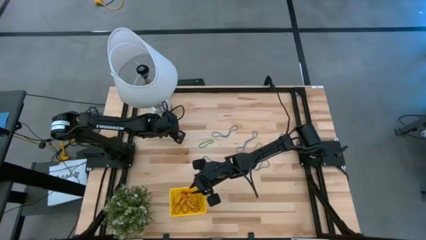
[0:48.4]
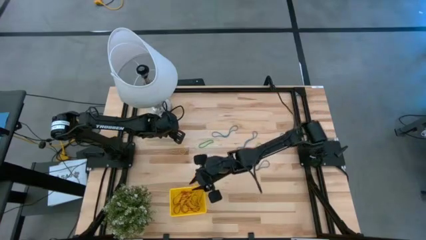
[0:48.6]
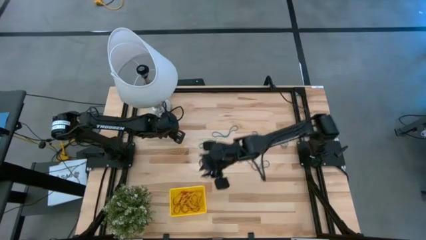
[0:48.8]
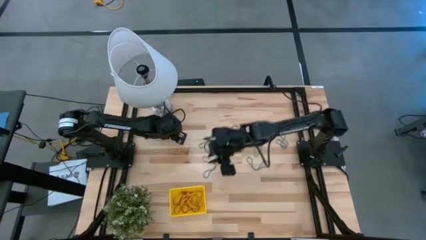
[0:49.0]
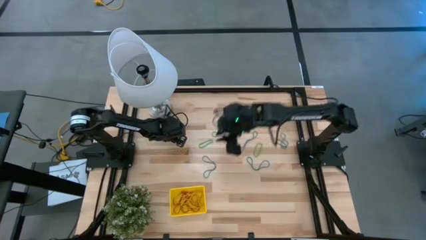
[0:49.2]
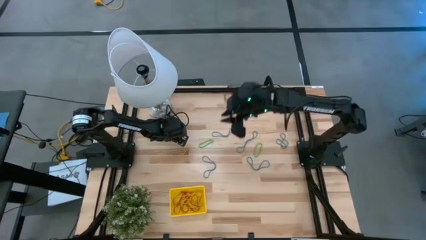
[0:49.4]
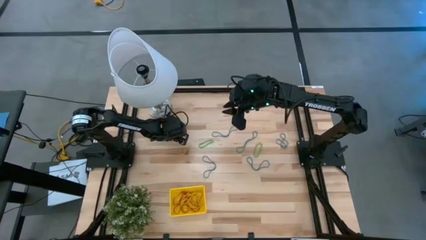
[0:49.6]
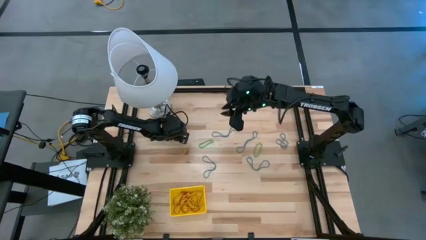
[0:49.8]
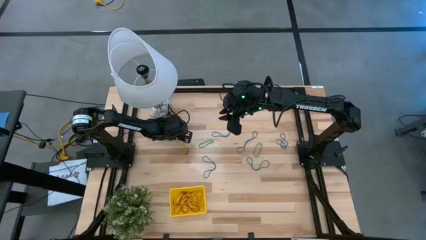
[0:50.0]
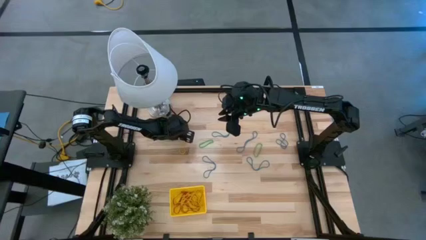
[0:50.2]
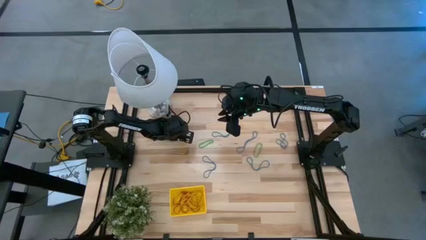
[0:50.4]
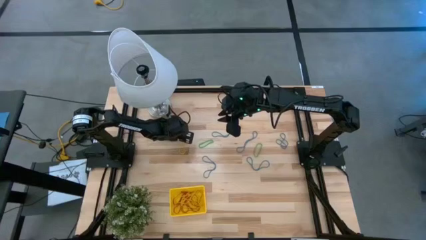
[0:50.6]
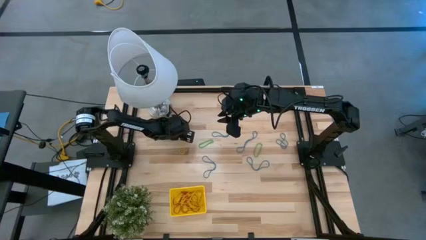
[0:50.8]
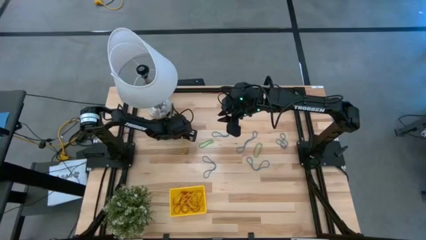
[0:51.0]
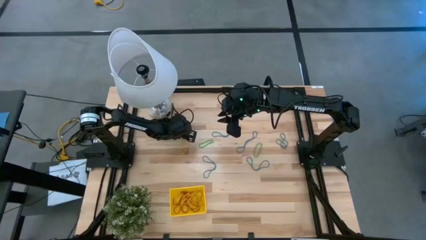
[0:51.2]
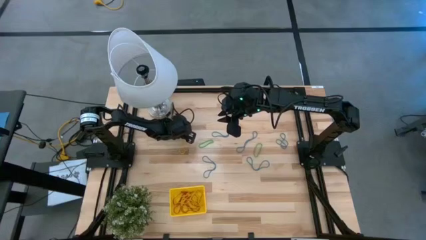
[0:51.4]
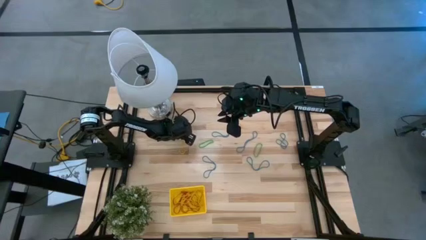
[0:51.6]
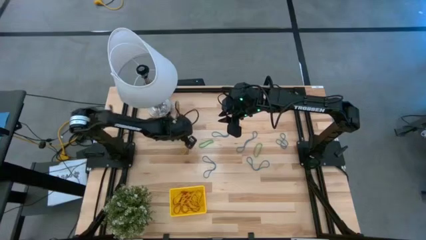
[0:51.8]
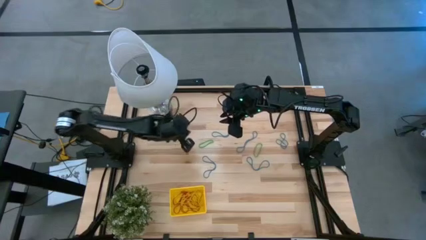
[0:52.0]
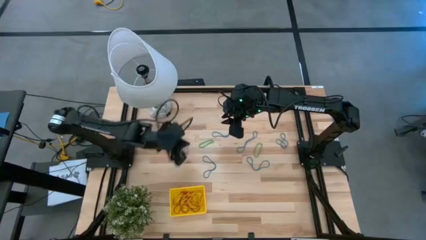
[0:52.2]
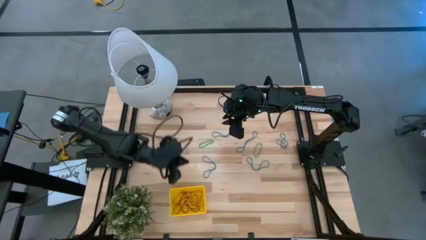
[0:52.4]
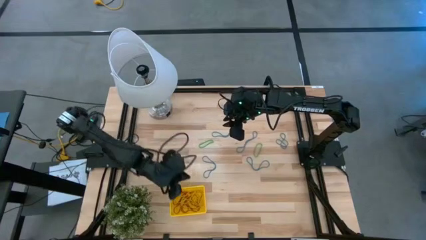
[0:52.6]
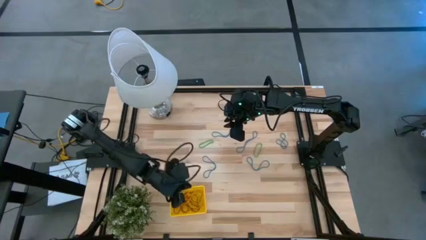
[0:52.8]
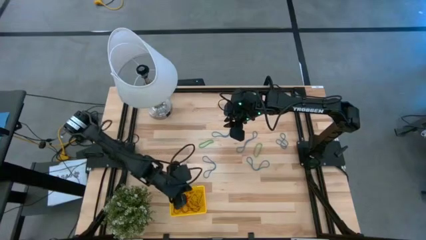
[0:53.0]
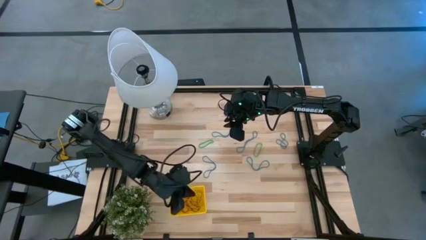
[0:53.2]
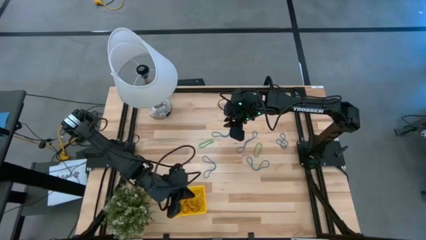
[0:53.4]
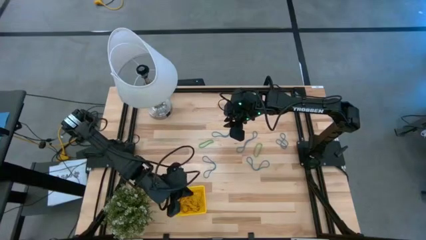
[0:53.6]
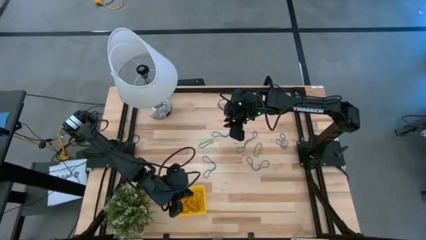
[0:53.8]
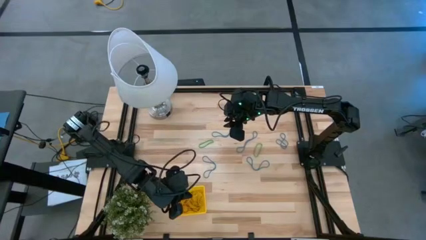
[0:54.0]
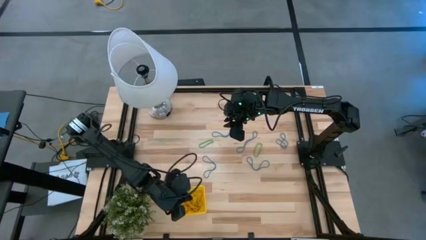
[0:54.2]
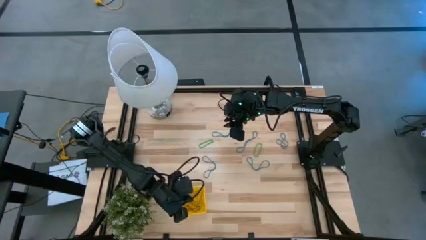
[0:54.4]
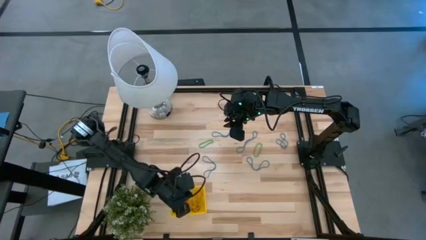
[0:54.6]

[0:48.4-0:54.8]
Task: Pick and place items into bin
Put the yellow rubber band into the yellow bin

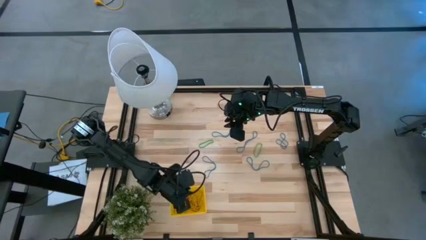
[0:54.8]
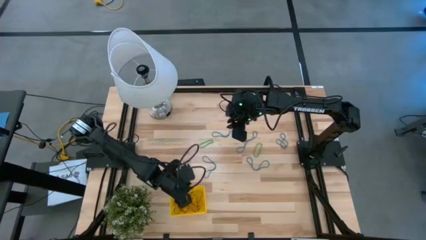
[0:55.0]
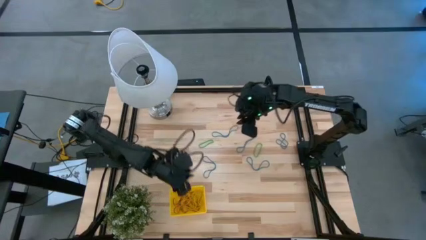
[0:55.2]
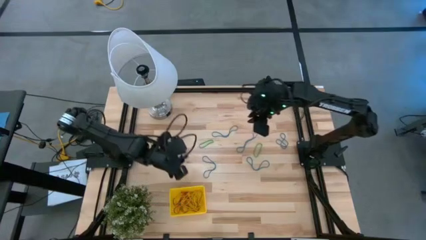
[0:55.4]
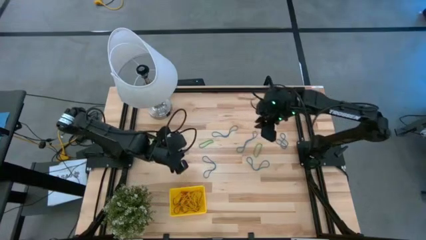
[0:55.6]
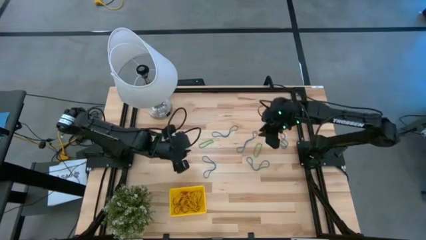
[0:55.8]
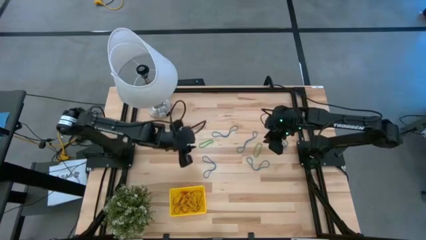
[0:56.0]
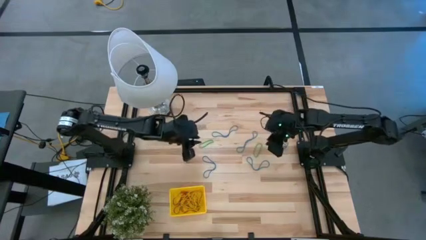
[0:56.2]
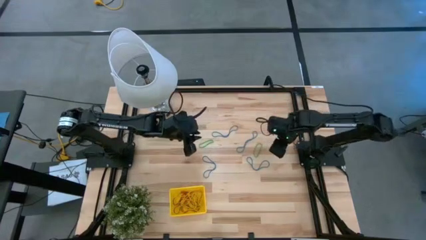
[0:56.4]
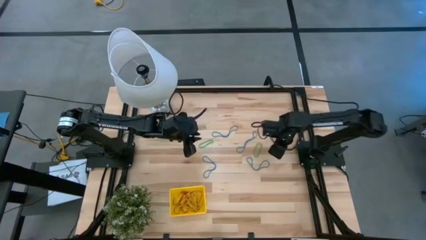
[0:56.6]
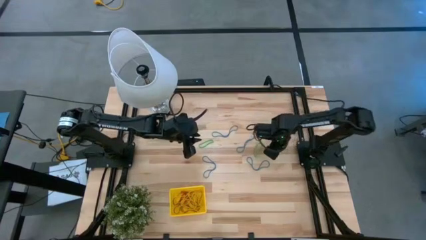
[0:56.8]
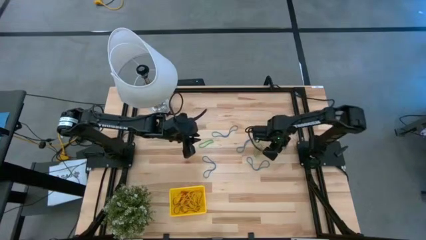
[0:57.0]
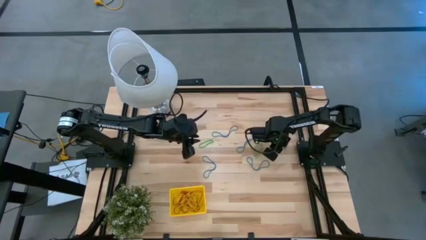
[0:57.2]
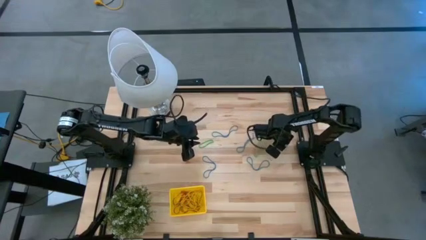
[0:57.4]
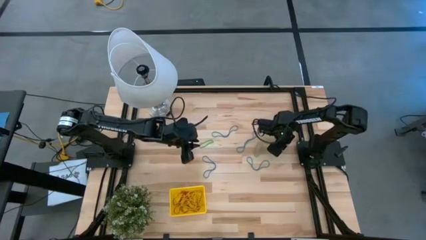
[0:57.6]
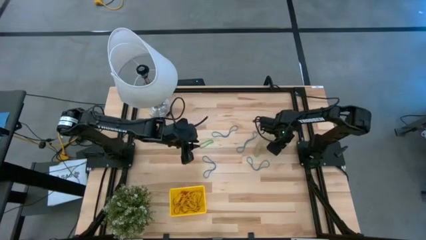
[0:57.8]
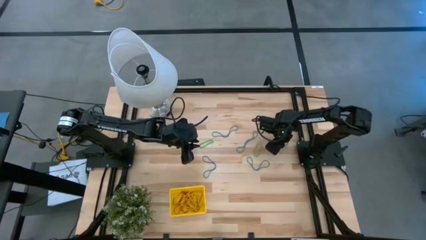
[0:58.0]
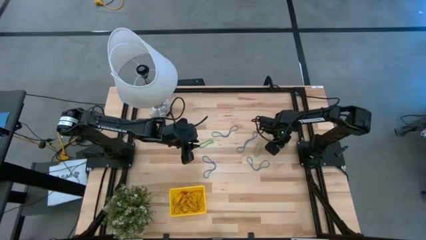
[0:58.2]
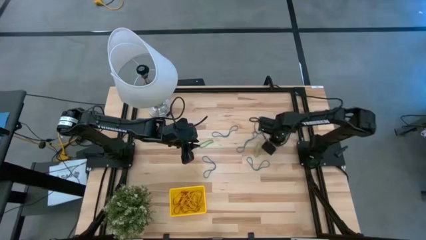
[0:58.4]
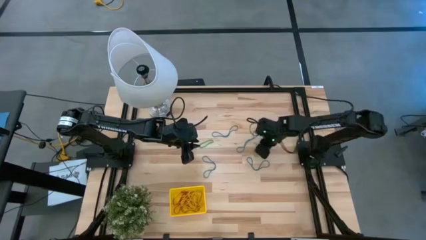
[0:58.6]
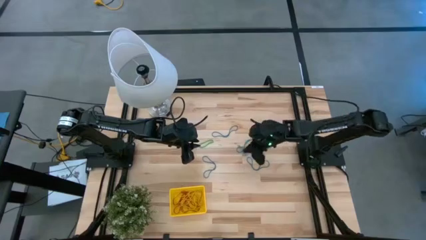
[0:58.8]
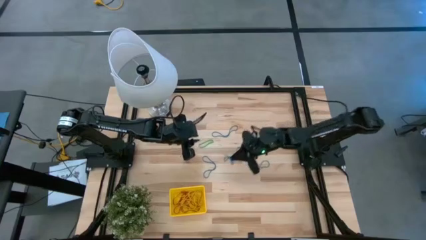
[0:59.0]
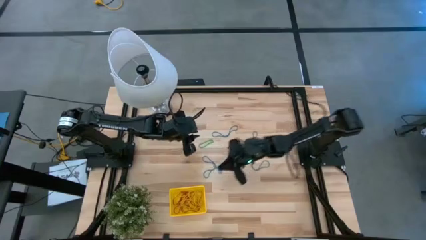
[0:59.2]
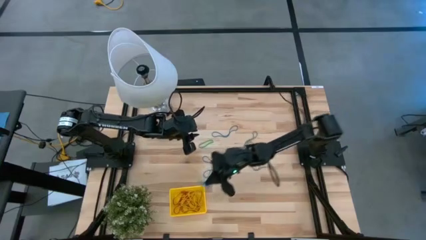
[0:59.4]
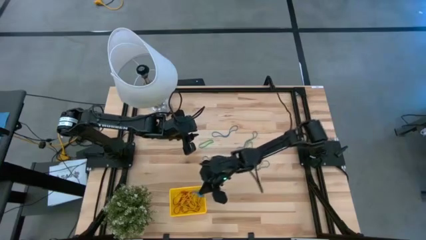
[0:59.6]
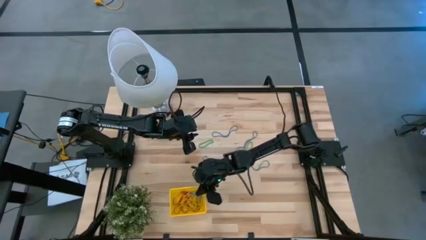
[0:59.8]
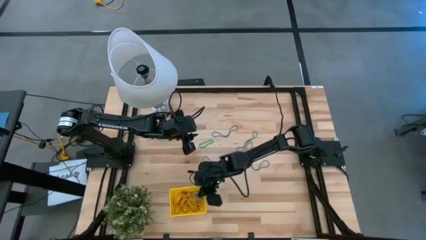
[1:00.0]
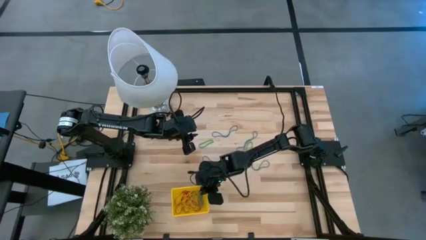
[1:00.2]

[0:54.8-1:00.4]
Put the blue rubber band into the yellow bin

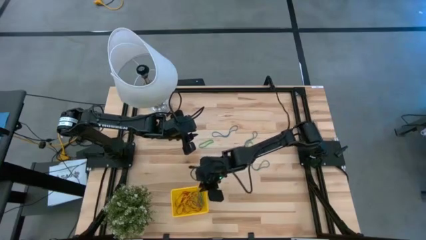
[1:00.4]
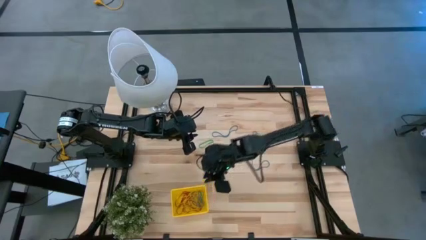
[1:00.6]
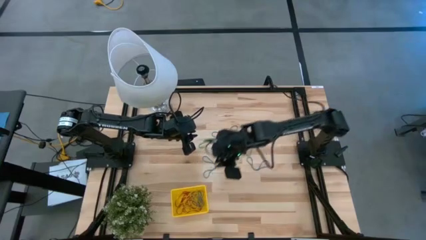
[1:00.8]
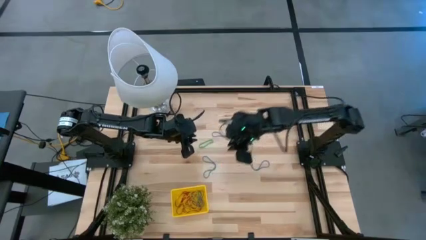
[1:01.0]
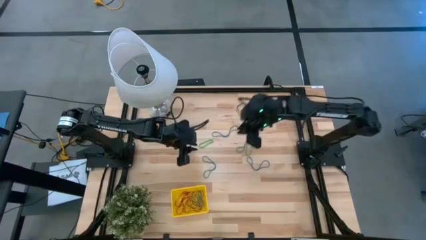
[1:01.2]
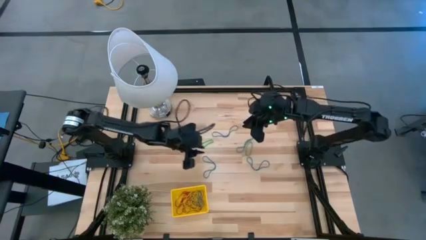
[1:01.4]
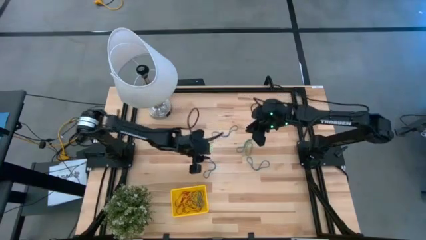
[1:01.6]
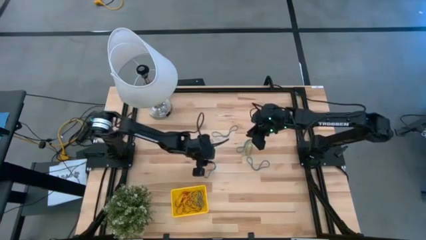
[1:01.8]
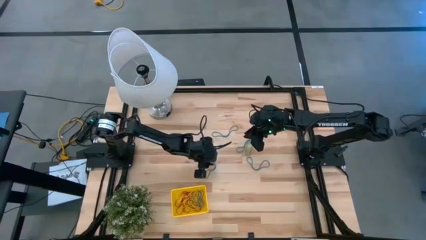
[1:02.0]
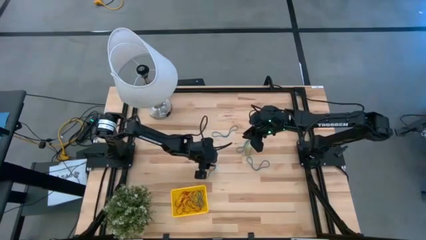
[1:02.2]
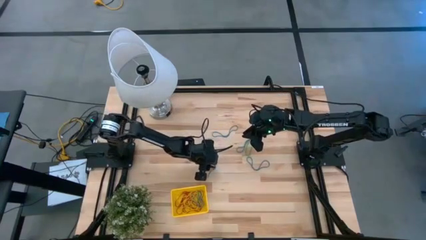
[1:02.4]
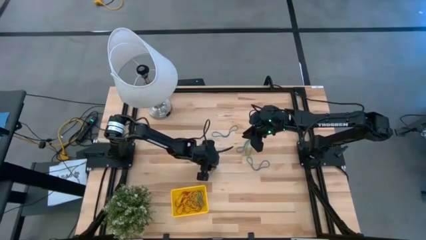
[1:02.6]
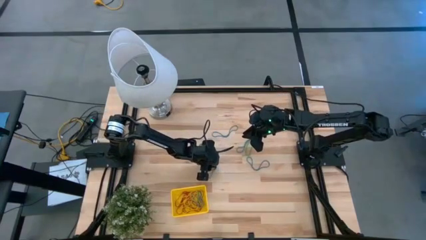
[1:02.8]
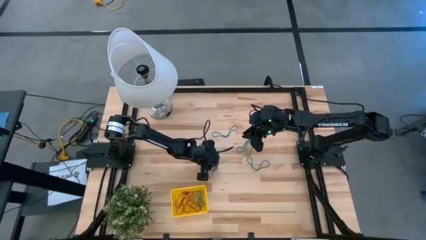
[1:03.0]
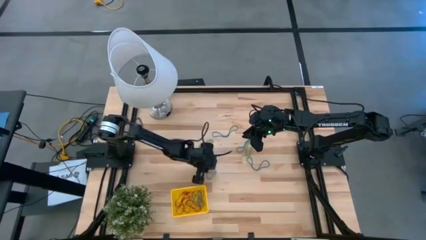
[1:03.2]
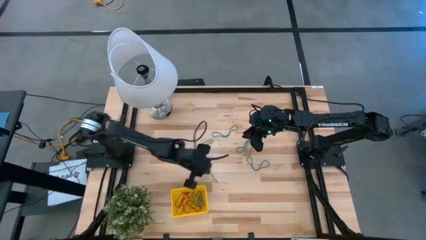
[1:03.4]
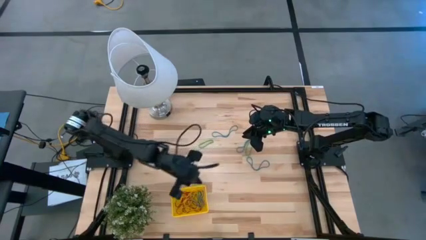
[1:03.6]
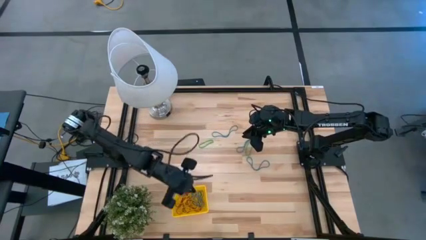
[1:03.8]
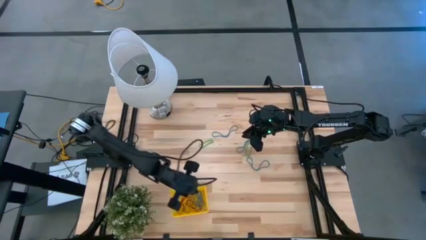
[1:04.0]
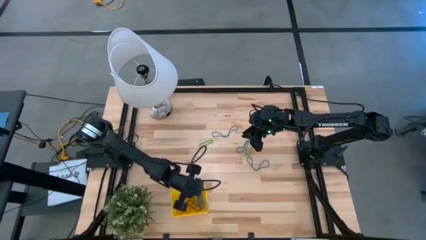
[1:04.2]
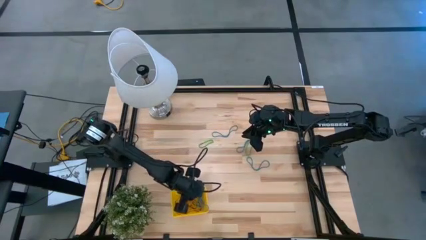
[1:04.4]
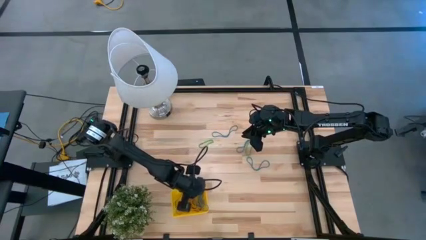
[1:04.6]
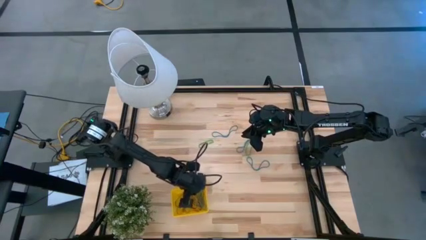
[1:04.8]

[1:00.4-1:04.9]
Put the blue rubber band into the yellow bin
